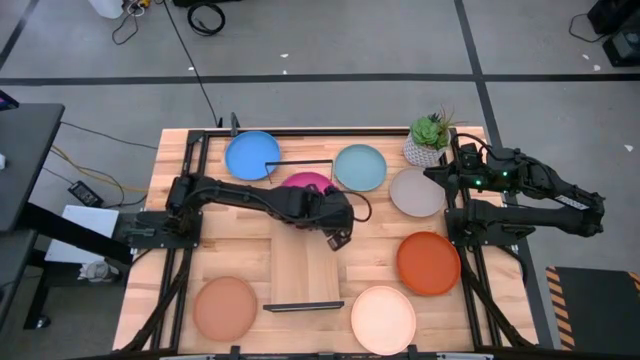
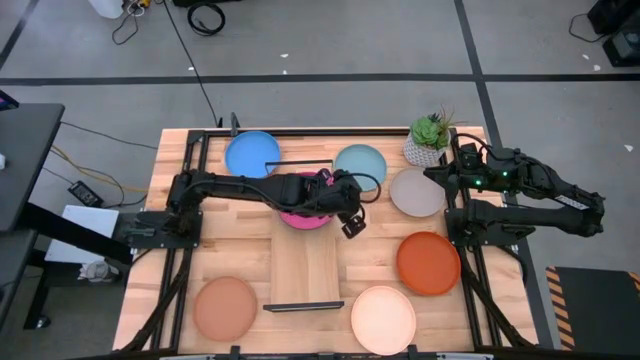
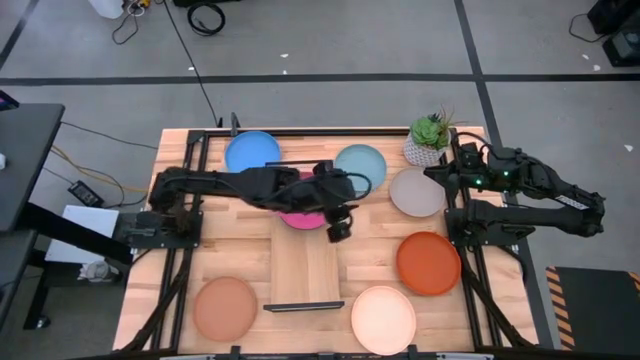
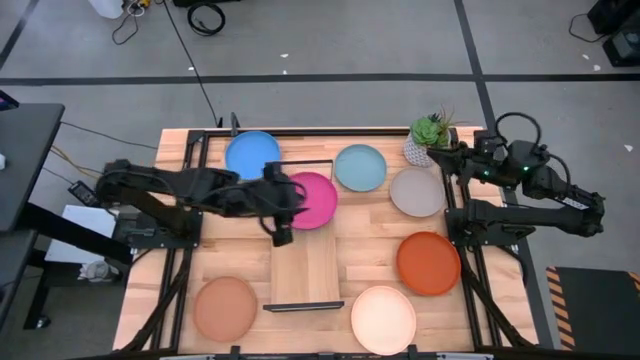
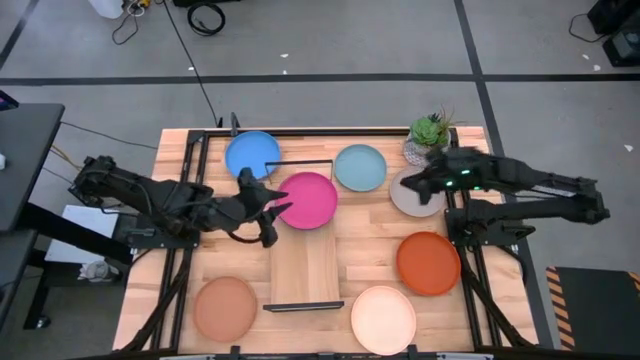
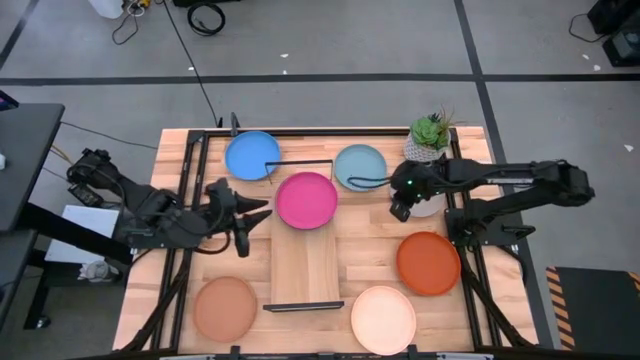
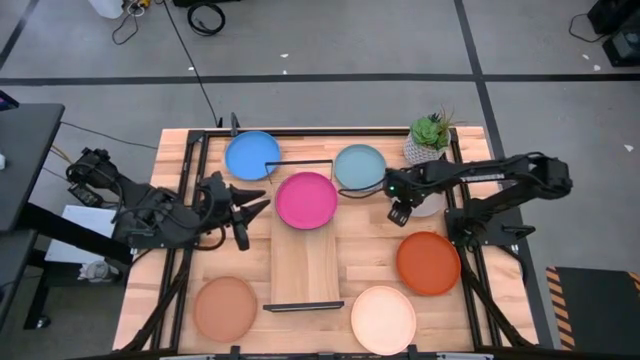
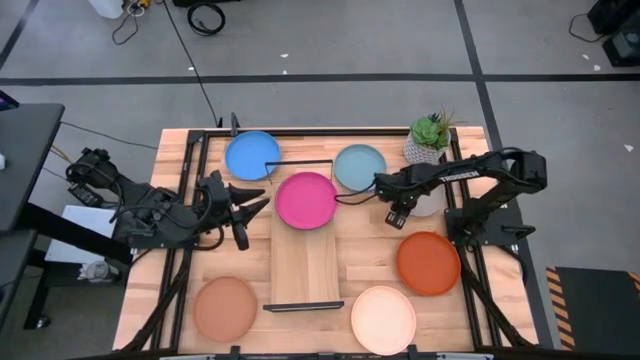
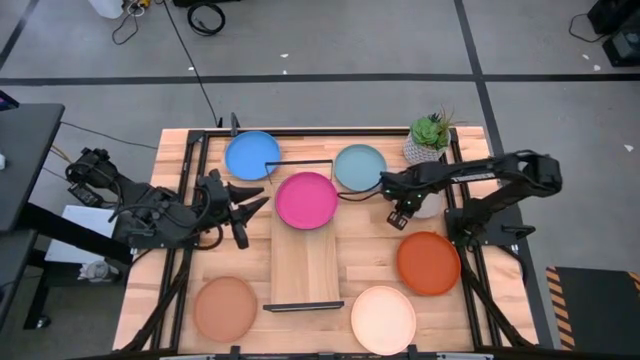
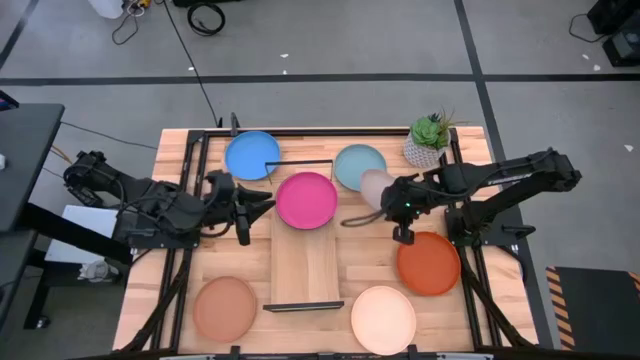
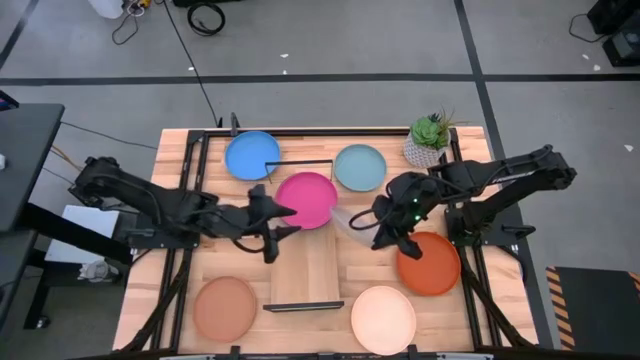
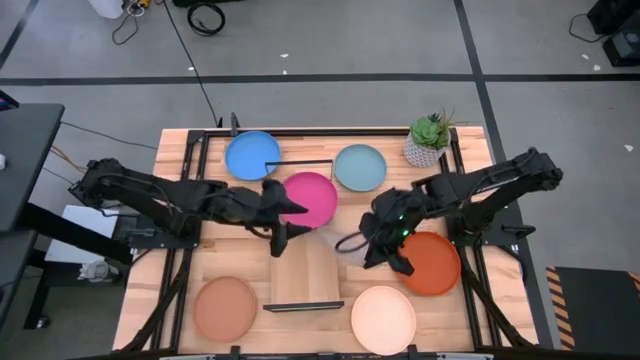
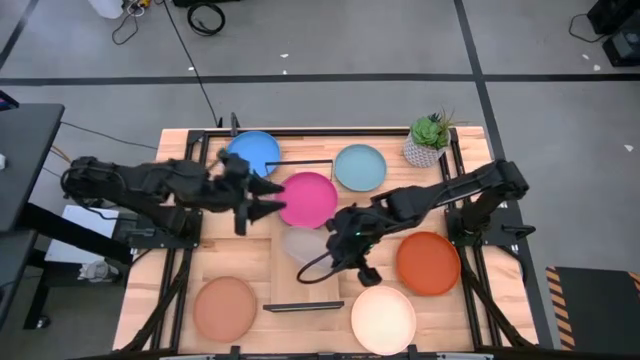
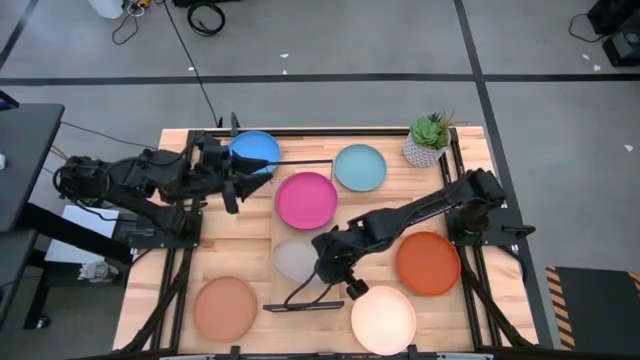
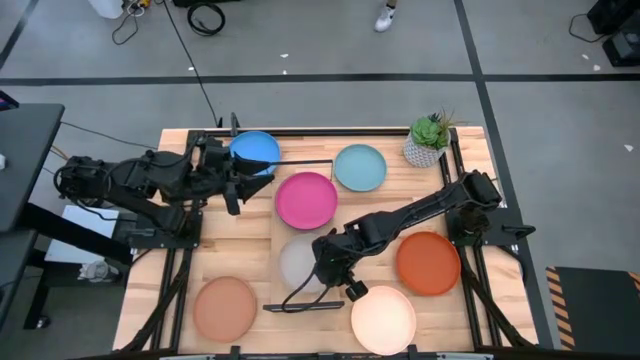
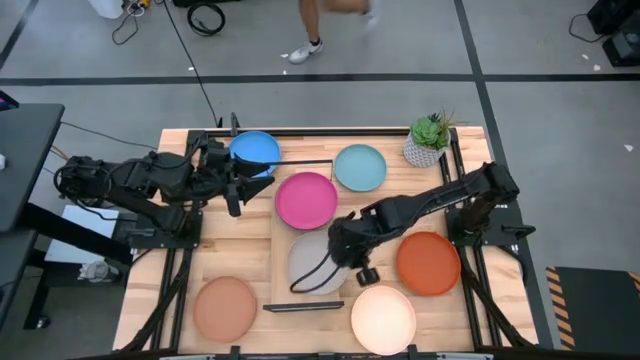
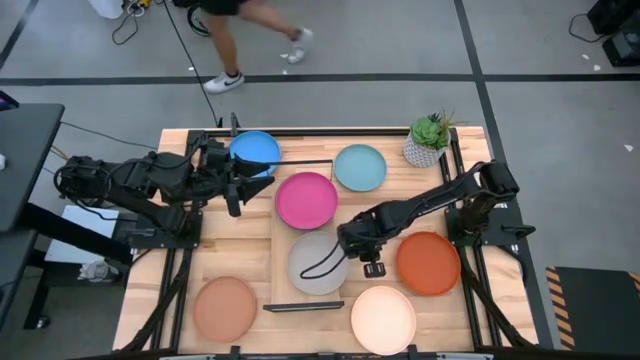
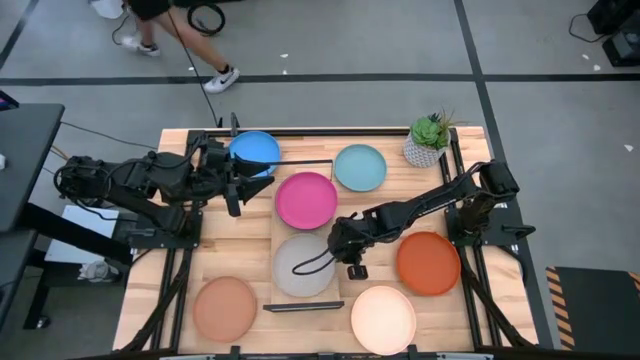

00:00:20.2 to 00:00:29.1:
Task: Place and stack plates onto a shelf
Put the gray plate on the shelf

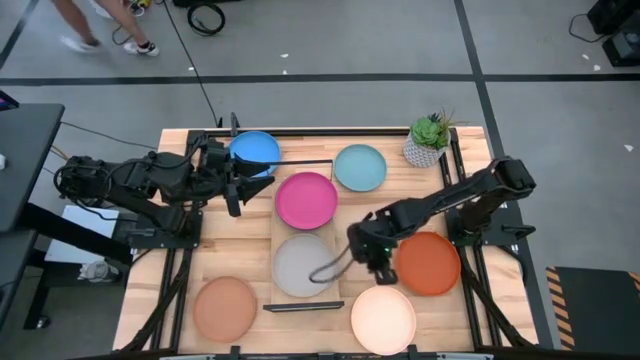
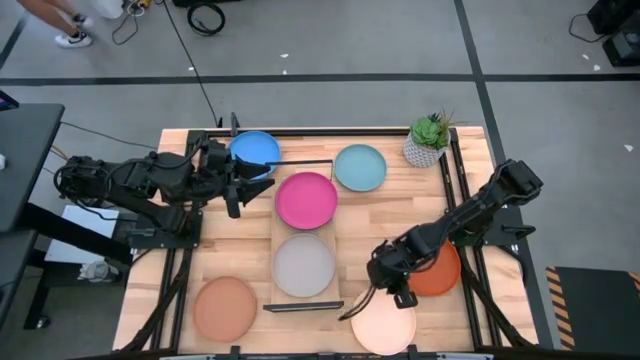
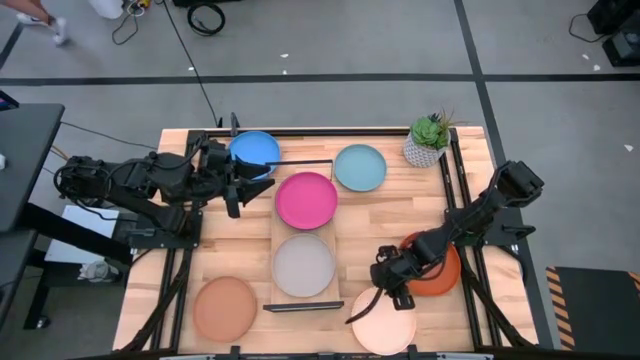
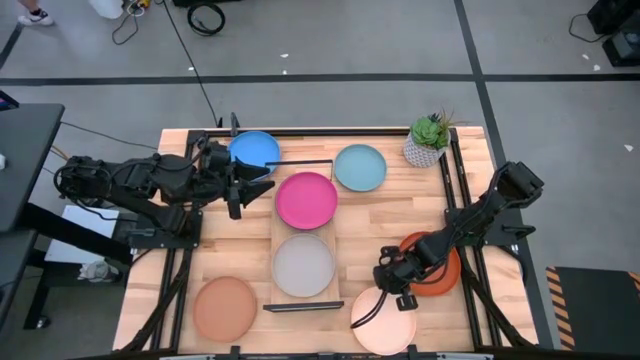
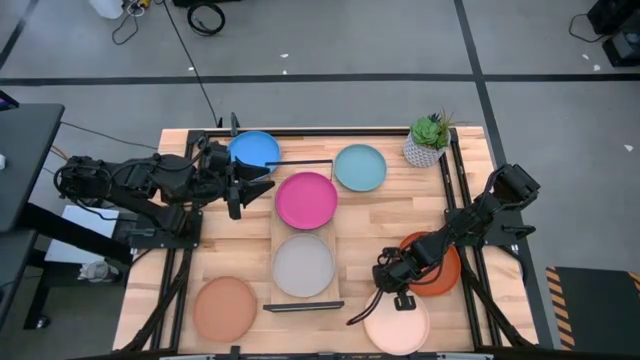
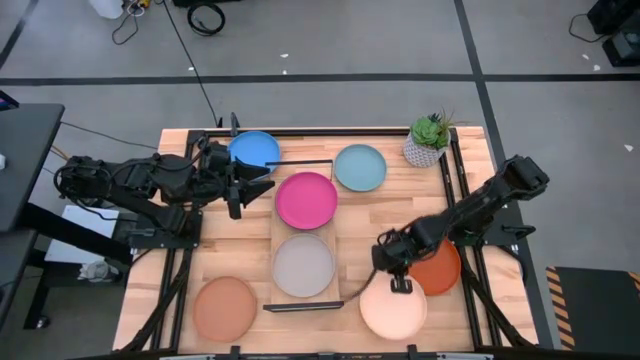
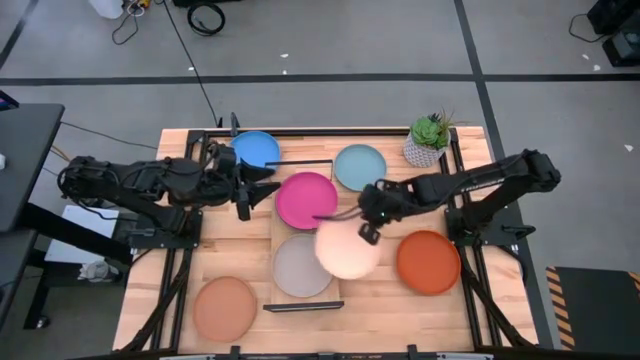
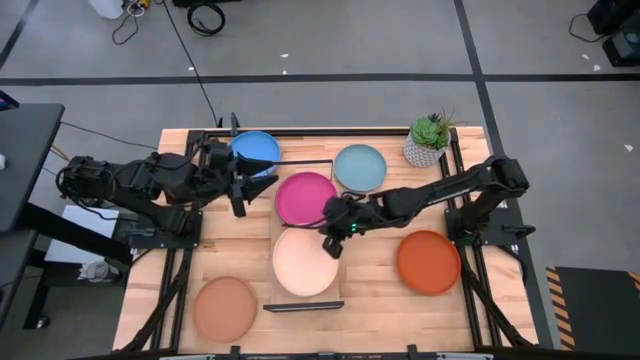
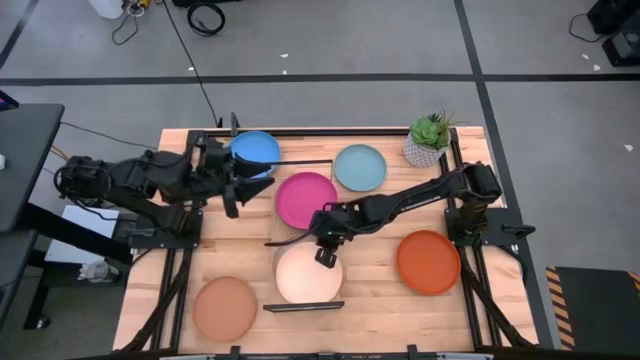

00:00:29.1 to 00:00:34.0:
Stack the light orange plate on the gray plate on the shelf

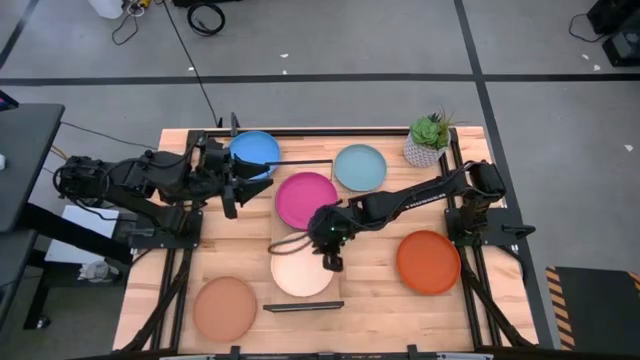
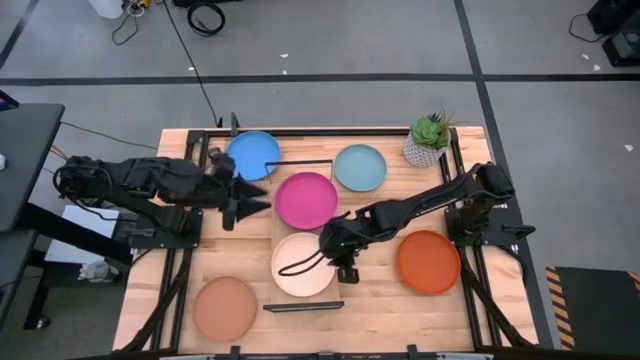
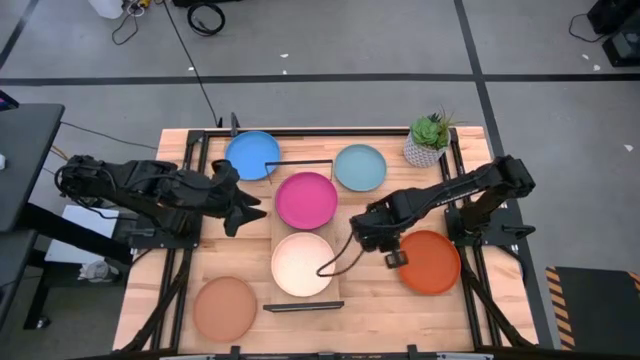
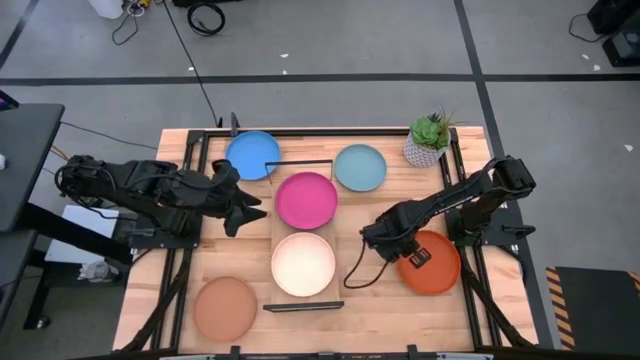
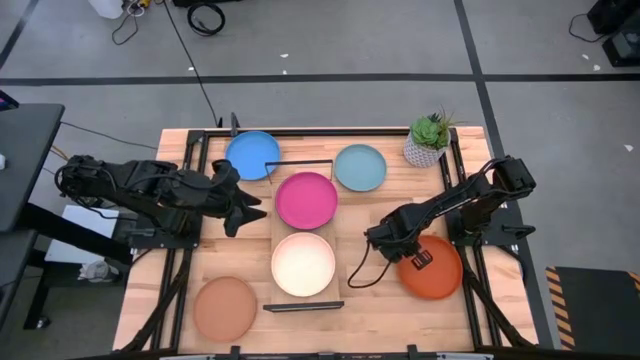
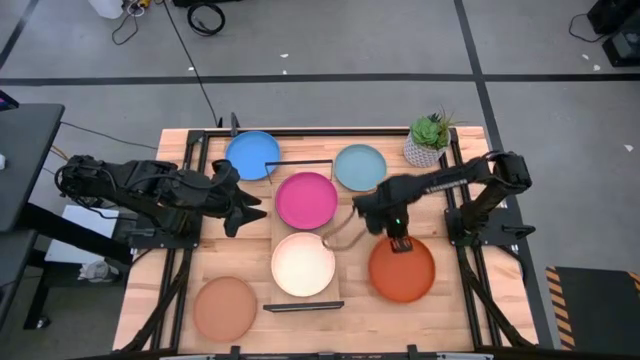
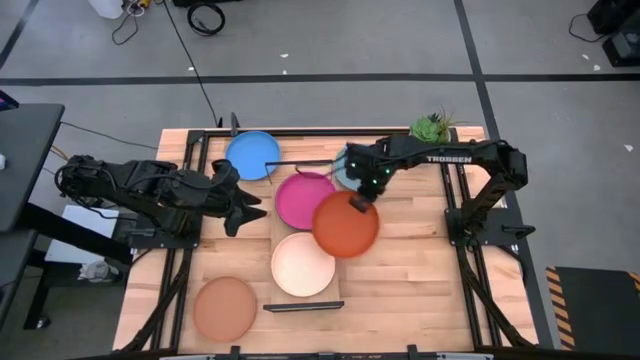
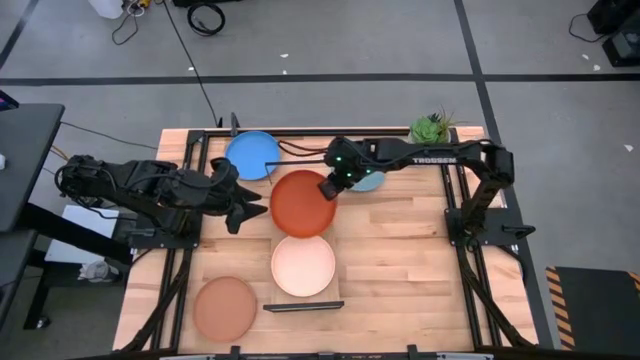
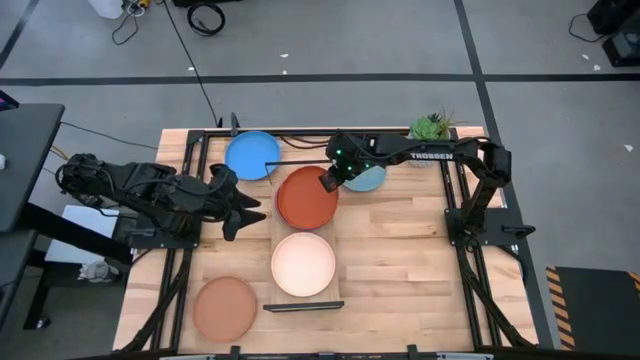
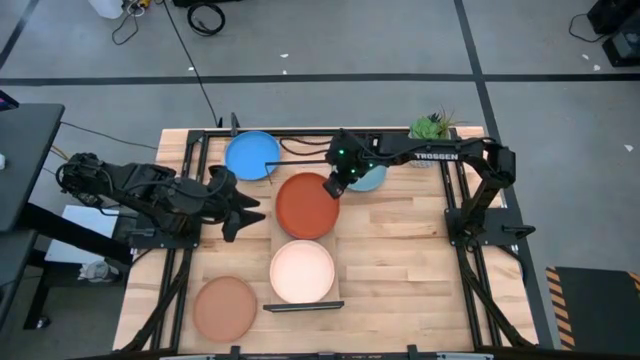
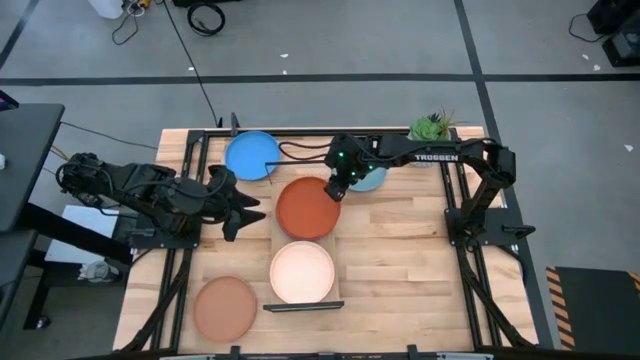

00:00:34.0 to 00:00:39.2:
Stack the orange plate on the pink plate on the shelf

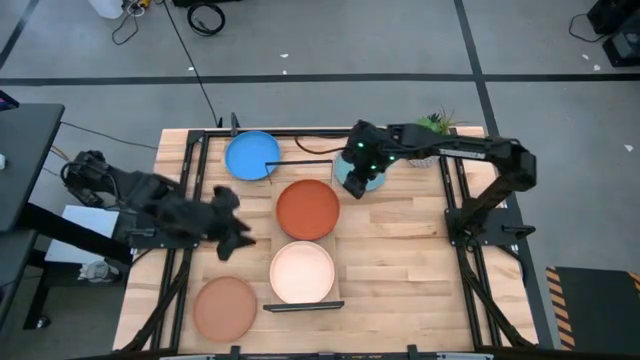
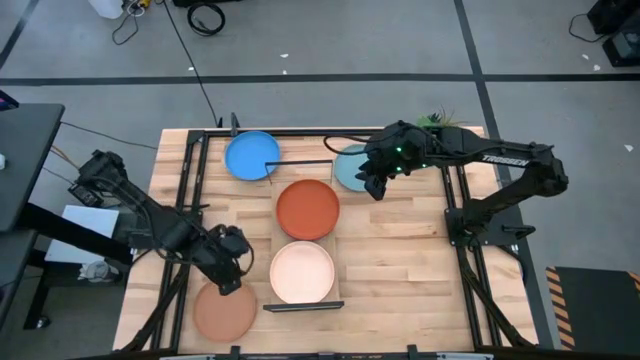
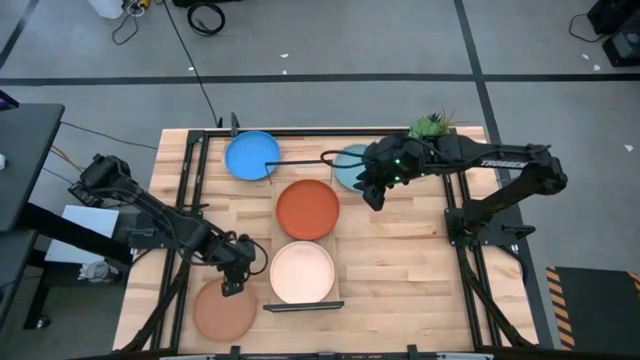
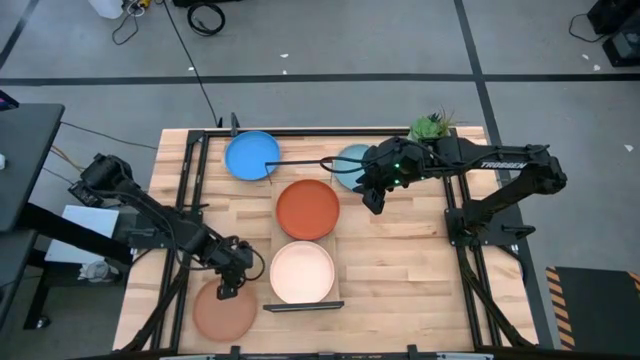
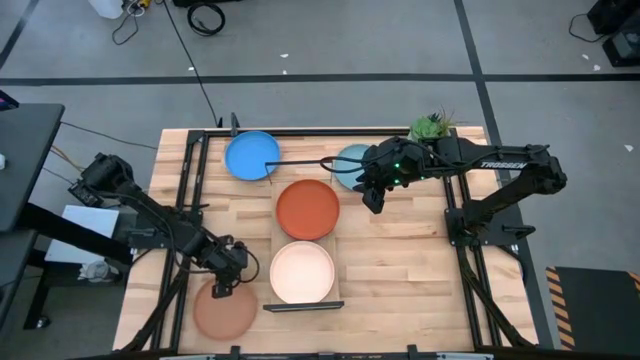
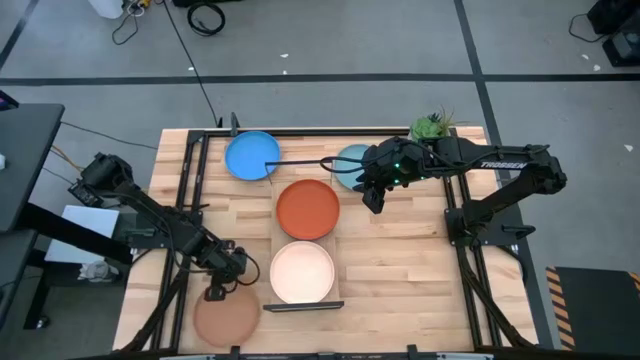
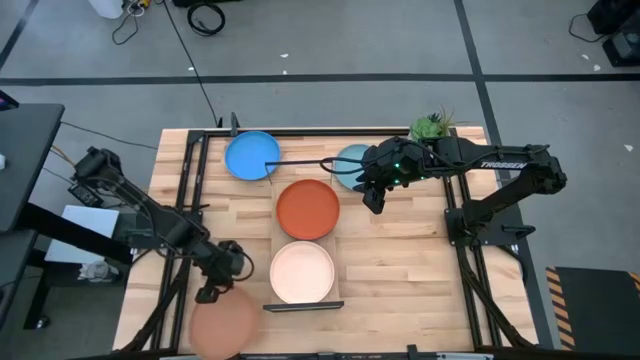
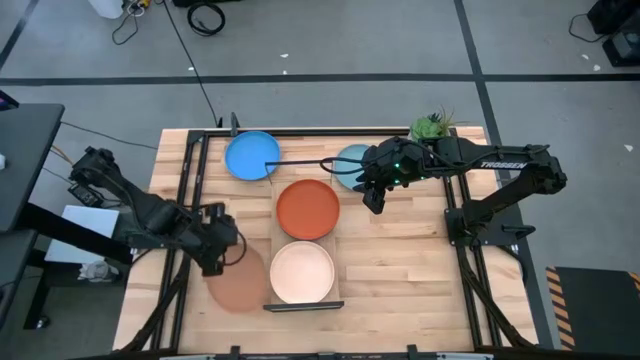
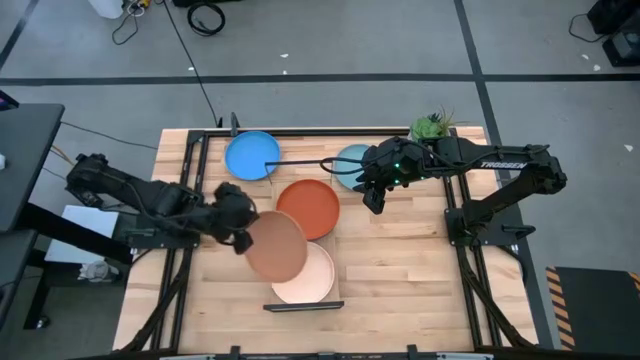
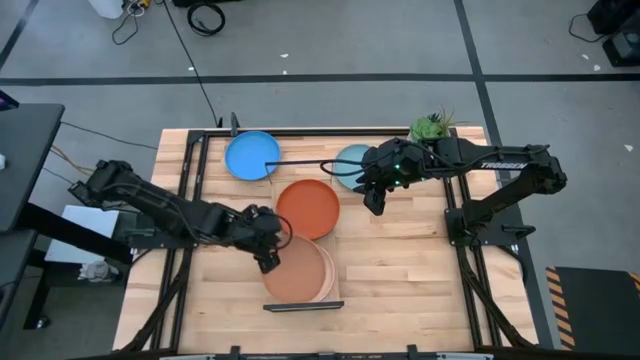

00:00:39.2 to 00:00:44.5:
Stack the brown plate on the light orange plate on the shelf
